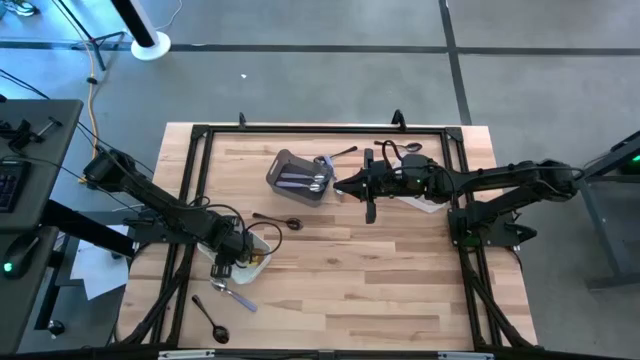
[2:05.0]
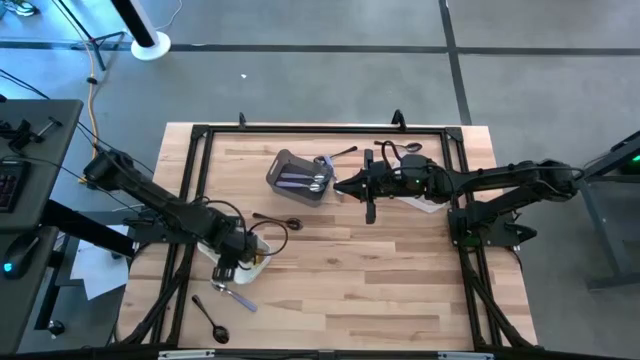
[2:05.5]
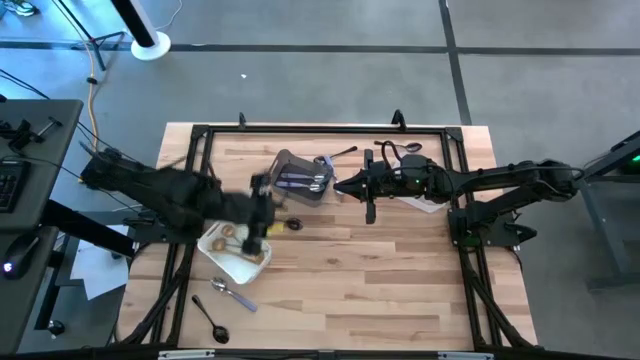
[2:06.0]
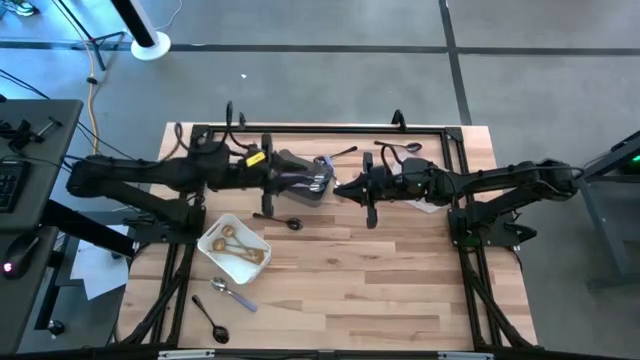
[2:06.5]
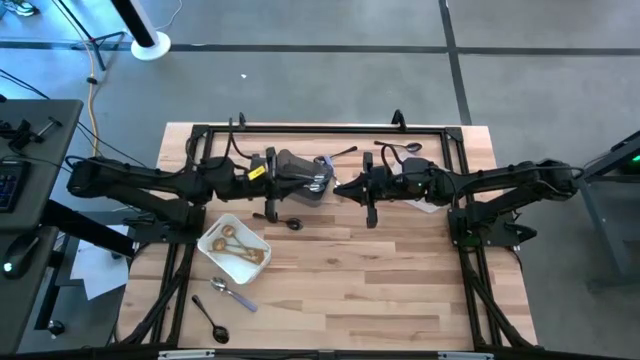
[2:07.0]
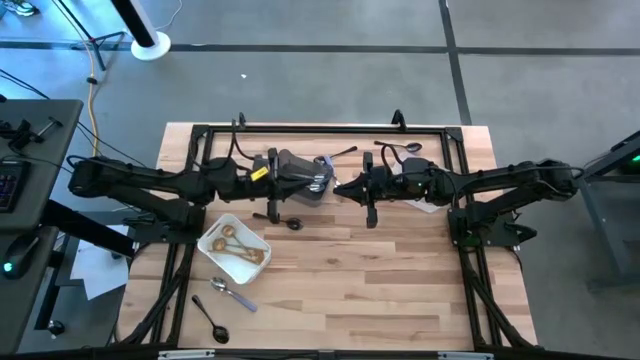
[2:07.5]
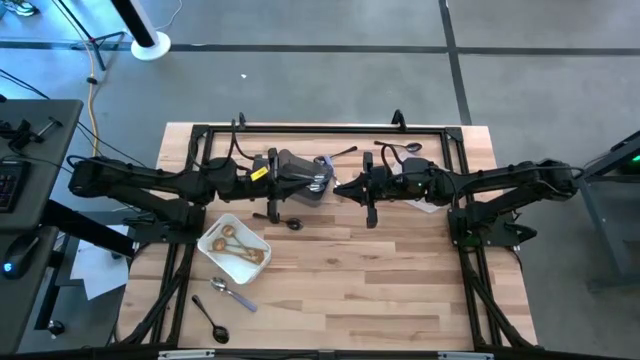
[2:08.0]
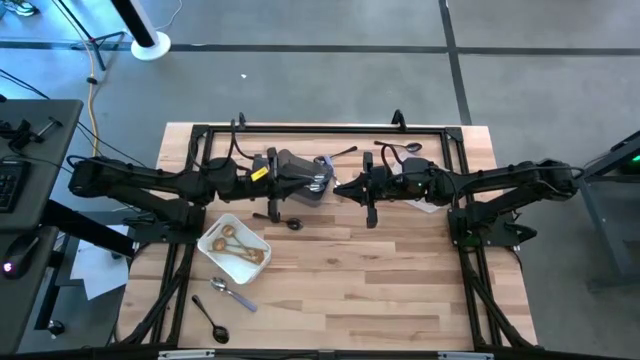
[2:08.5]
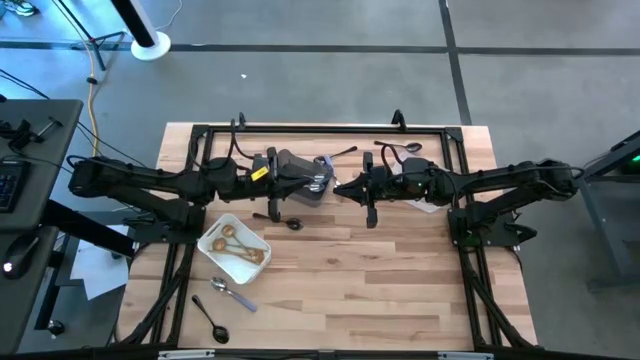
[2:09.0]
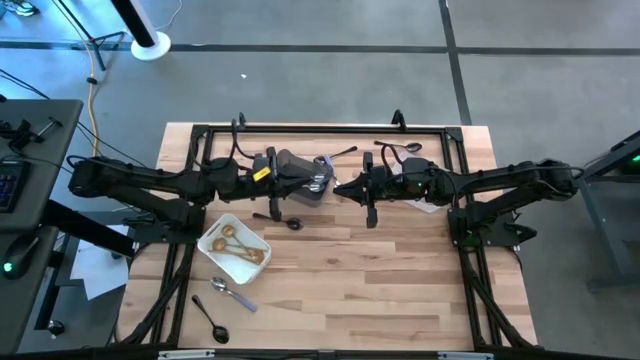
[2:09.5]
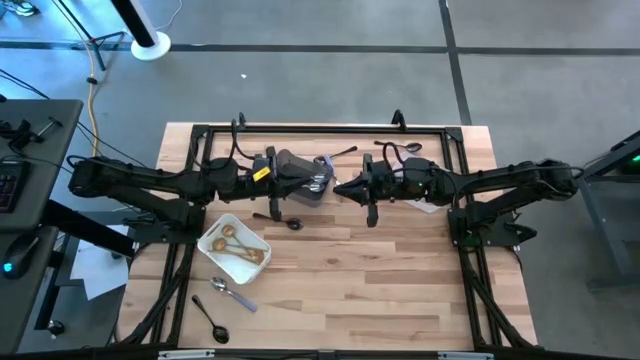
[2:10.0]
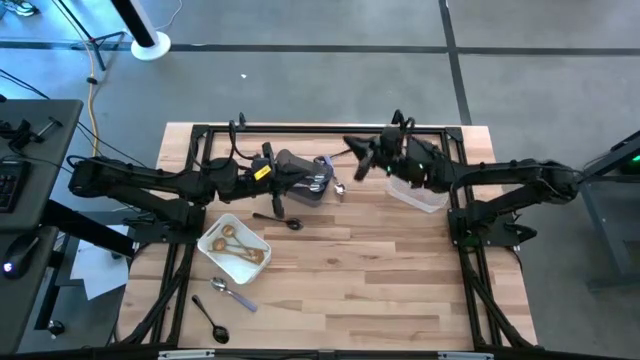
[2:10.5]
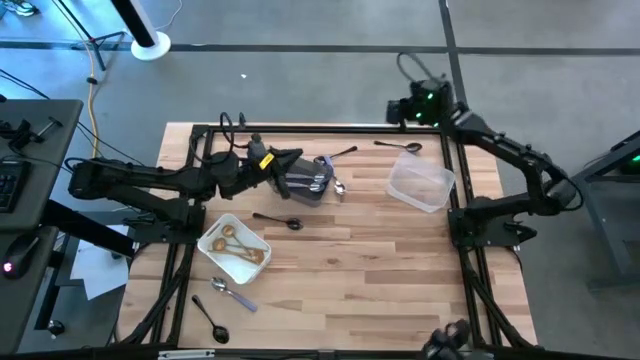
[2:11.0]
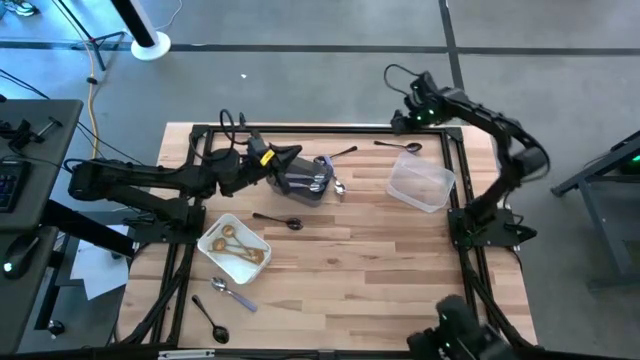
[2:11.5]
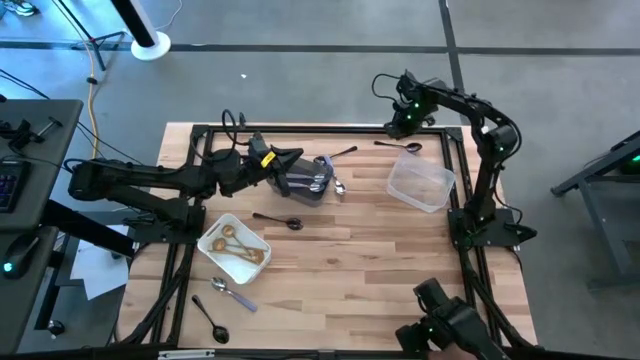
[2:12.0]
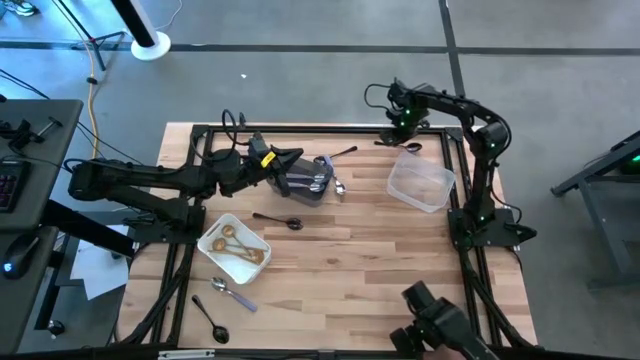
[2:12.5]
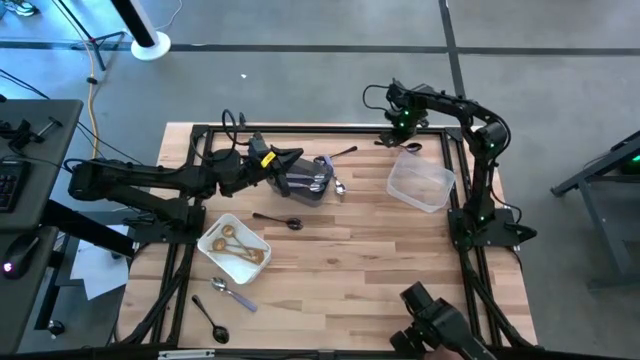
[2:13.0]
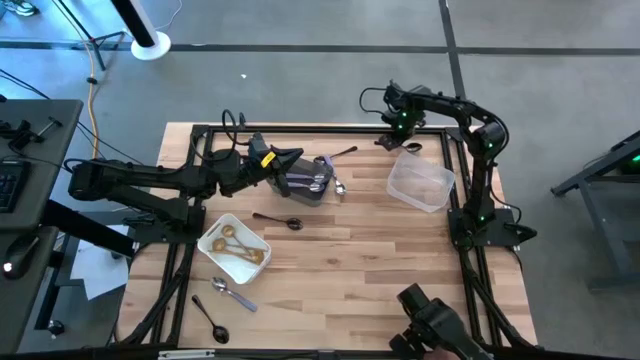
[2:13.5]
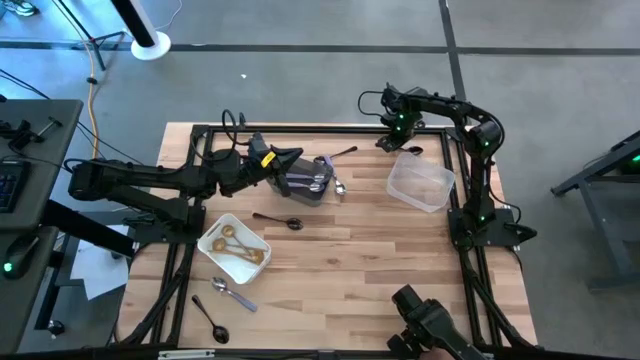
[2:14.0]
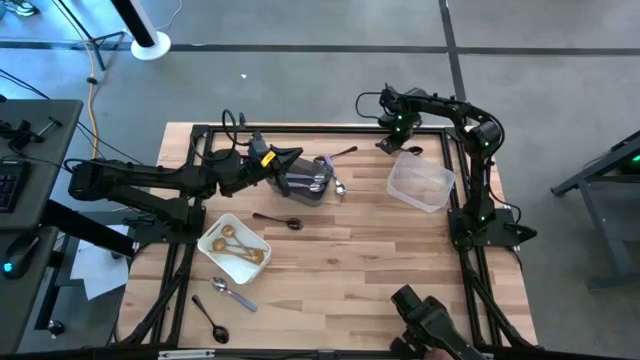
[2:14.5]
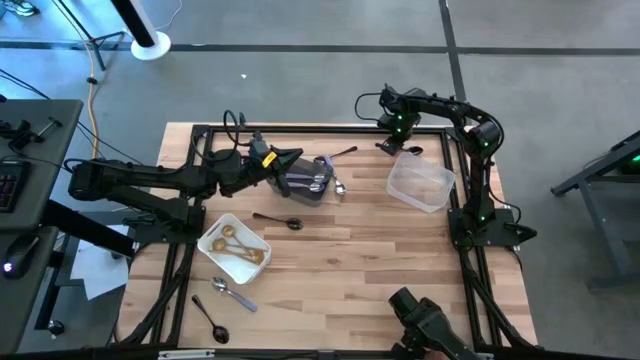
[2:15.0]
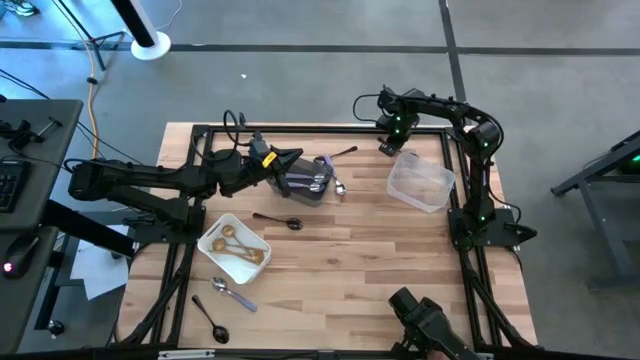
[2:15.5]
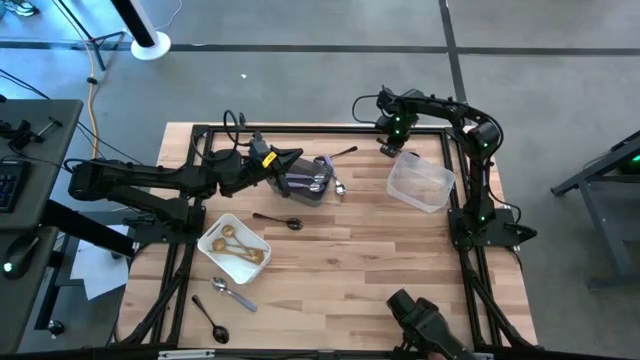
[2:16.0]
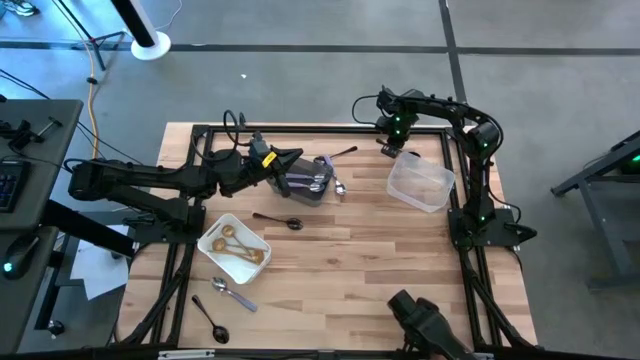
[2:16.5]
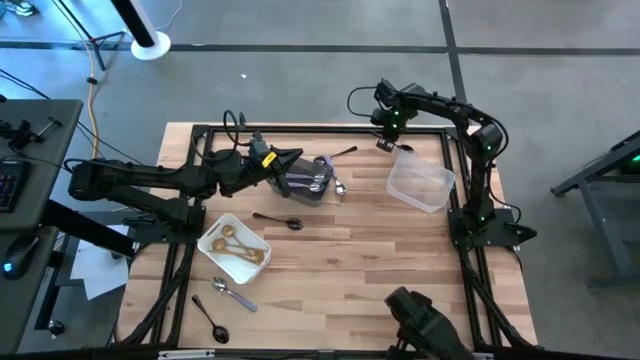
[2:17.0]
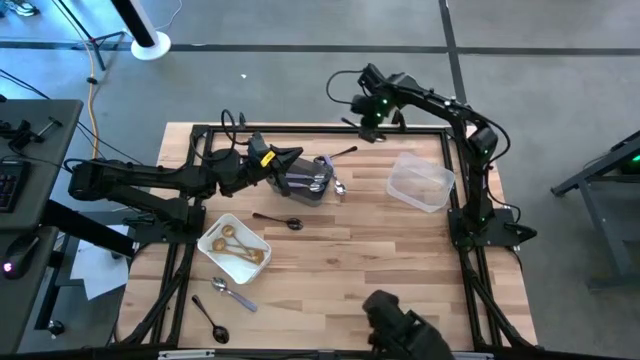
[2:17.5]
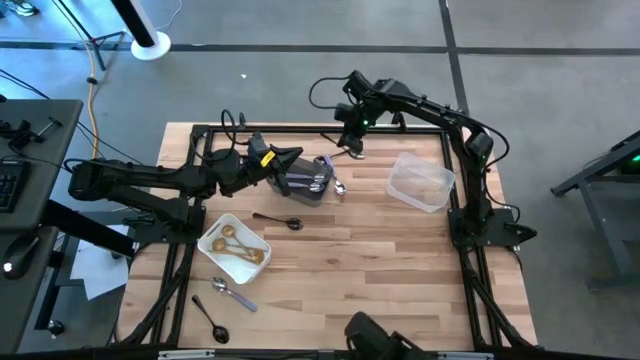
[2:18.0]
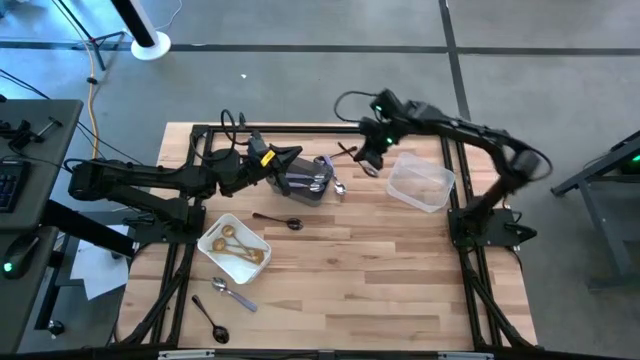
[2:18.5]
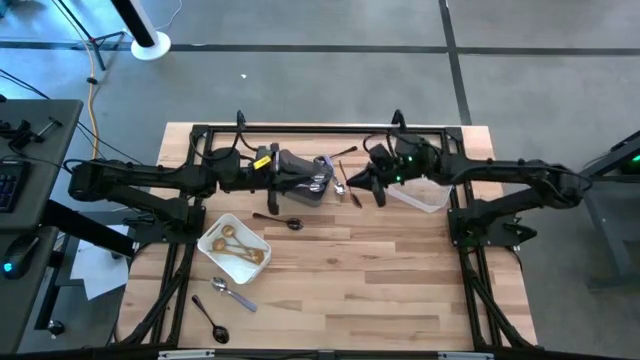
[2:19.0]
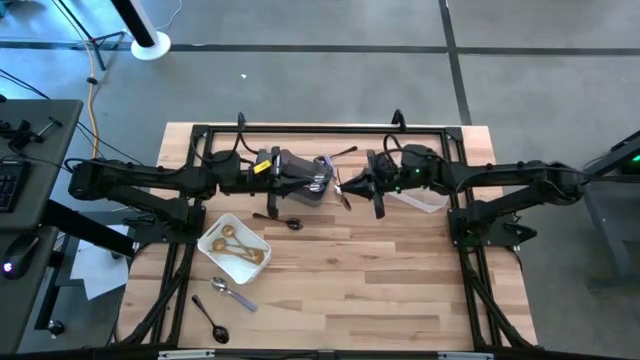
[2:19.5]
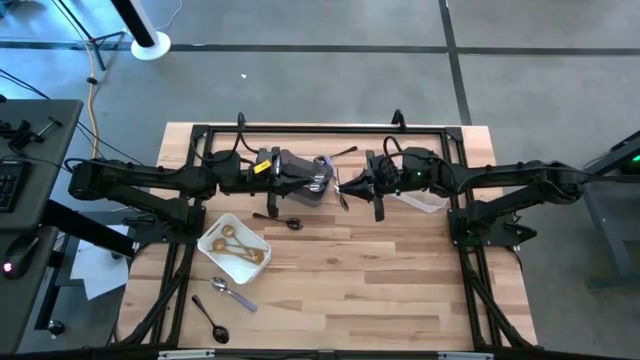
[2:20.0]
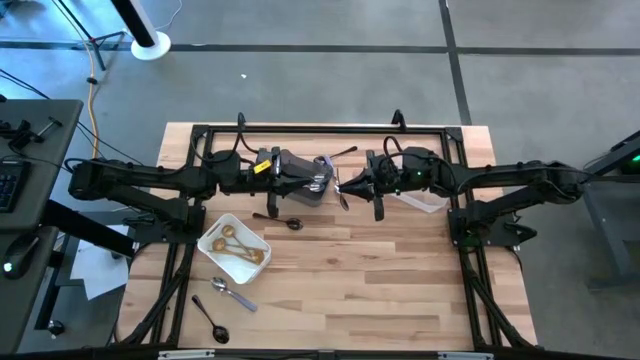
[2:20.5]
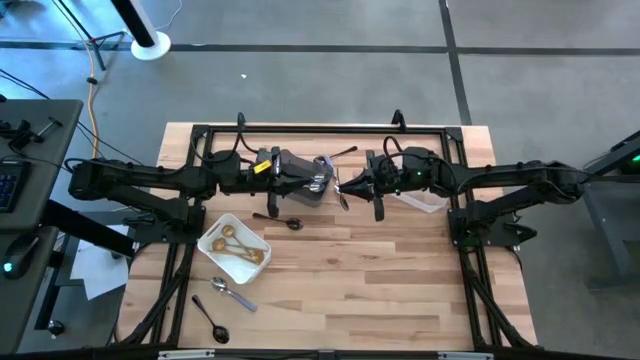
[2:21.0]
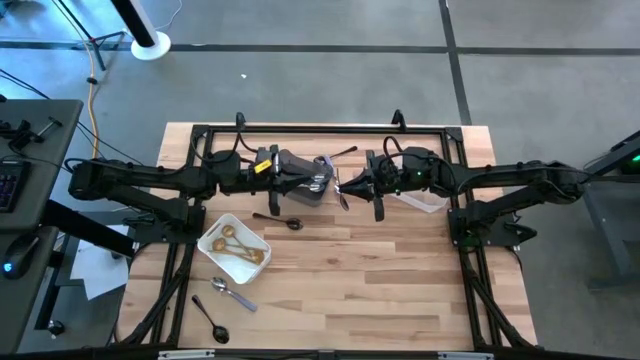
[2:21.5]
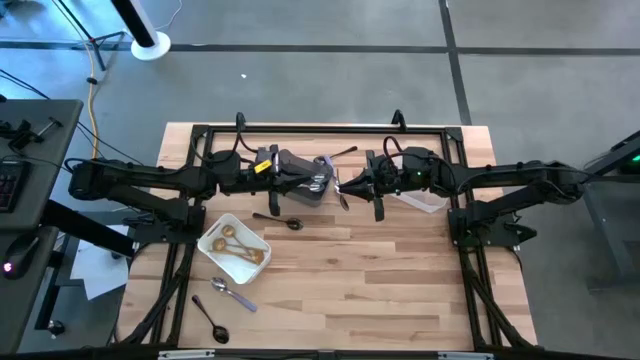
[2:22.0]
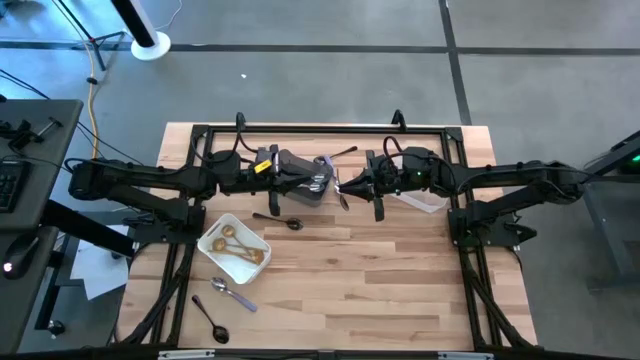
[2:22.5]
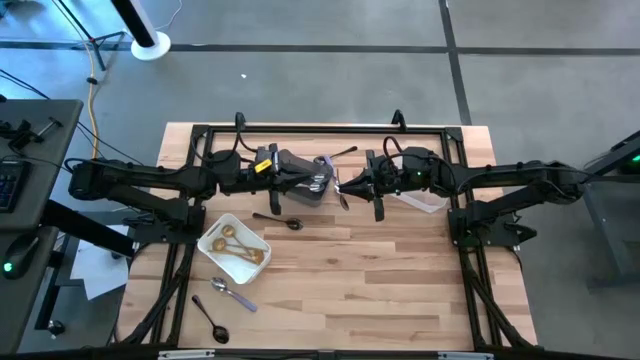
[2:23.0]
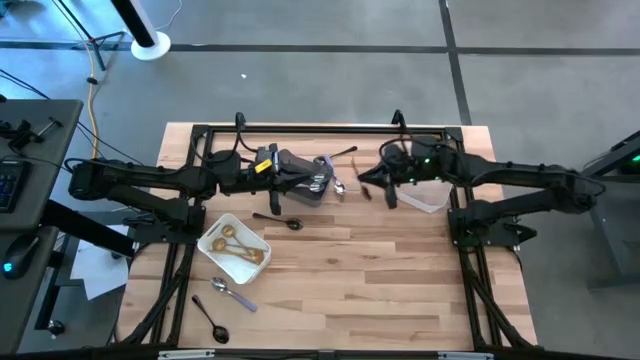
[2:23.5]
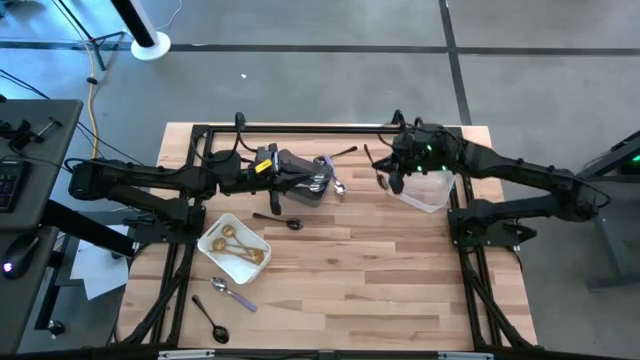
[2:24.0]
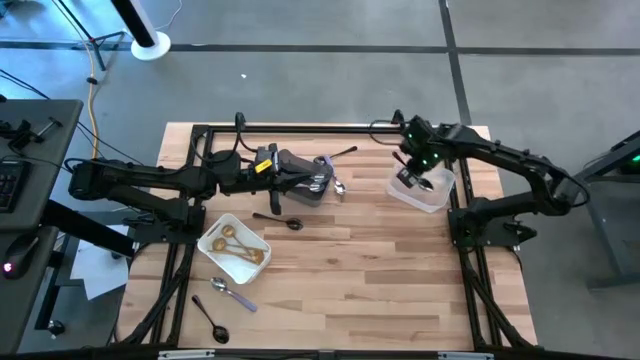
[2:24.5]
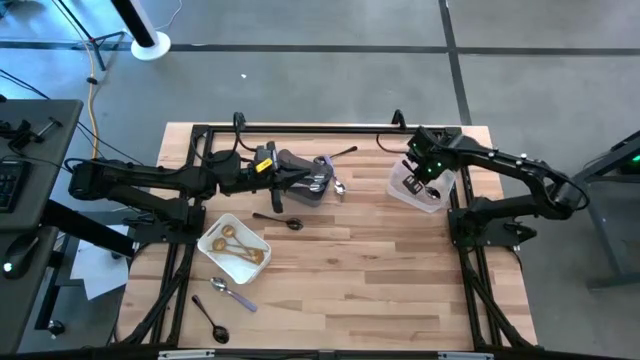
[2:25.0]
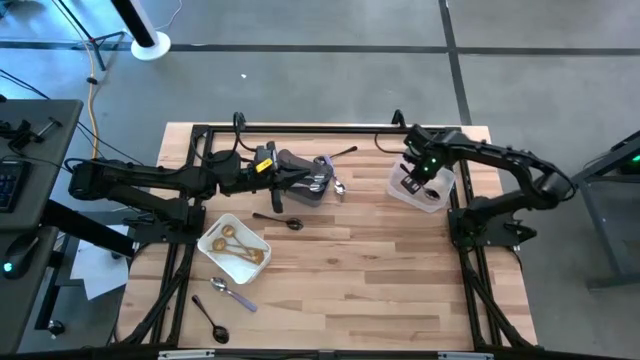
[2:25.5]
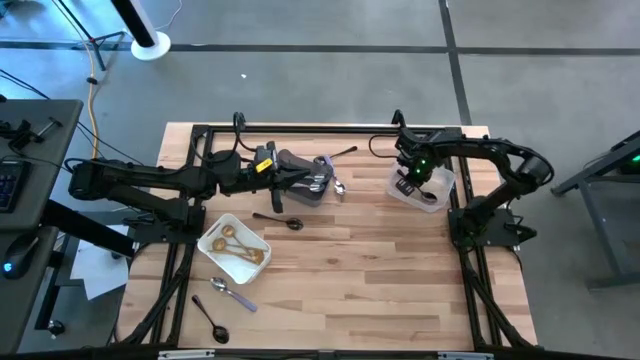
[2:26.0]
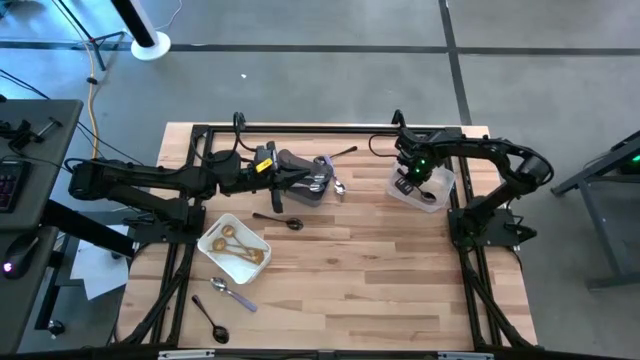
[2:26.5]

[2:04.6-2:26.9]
Task: Sort silverware by color (type)
Put the top right black spoon into the transparent bin
